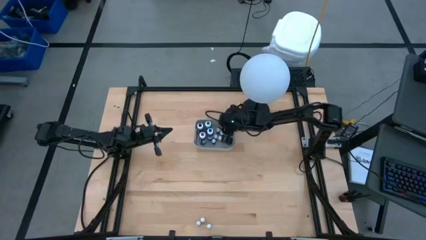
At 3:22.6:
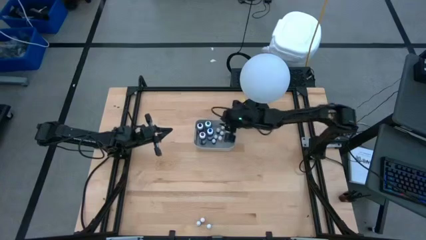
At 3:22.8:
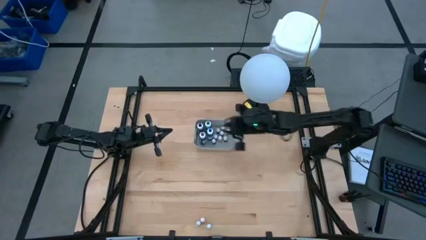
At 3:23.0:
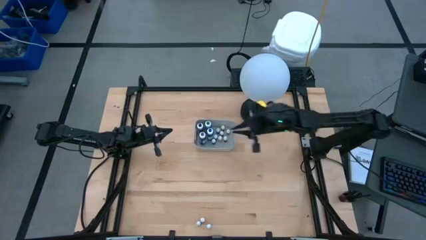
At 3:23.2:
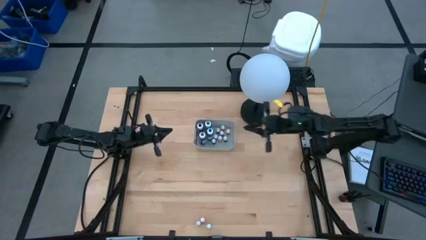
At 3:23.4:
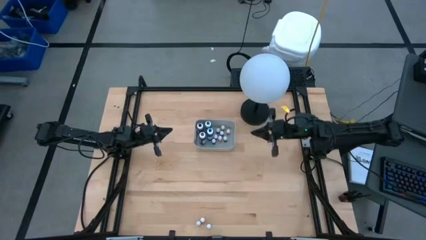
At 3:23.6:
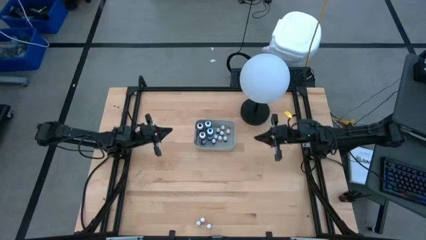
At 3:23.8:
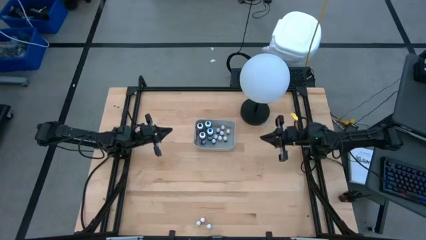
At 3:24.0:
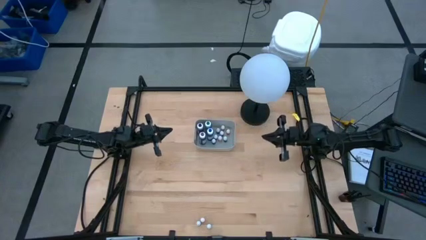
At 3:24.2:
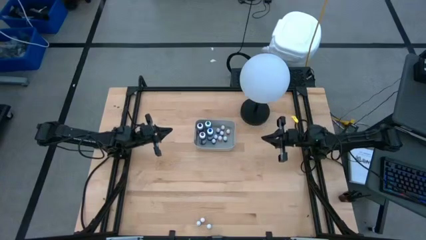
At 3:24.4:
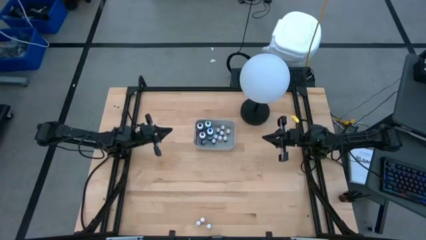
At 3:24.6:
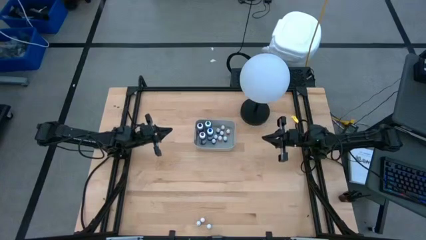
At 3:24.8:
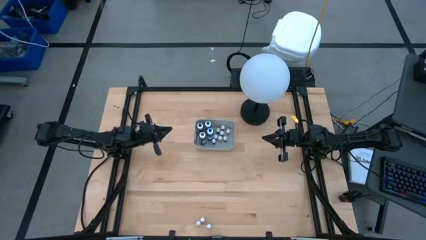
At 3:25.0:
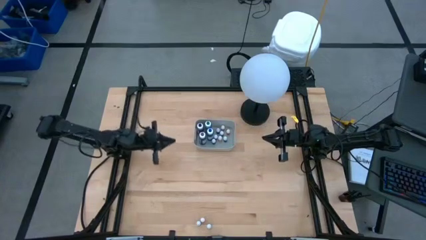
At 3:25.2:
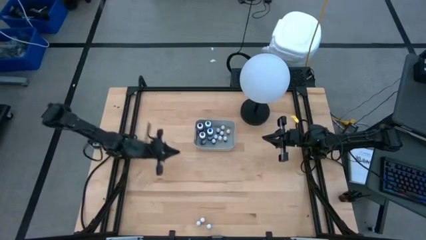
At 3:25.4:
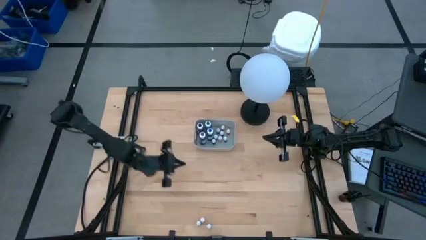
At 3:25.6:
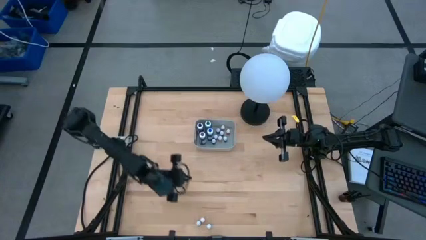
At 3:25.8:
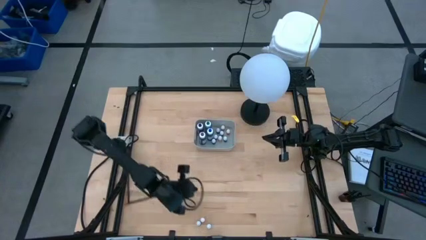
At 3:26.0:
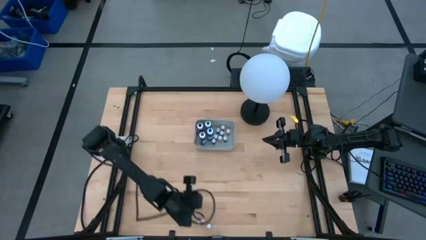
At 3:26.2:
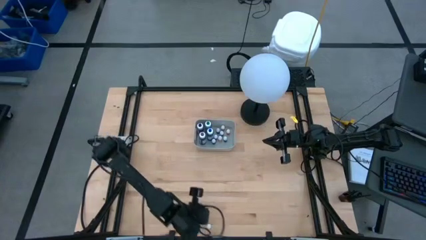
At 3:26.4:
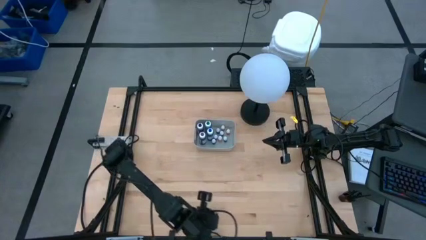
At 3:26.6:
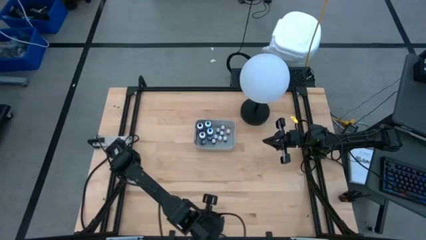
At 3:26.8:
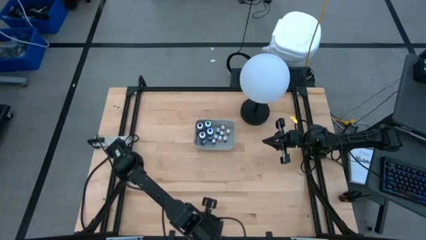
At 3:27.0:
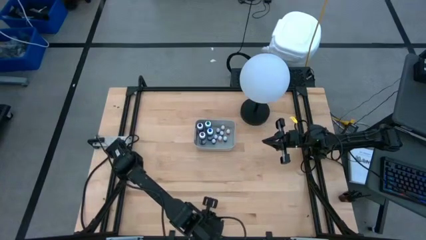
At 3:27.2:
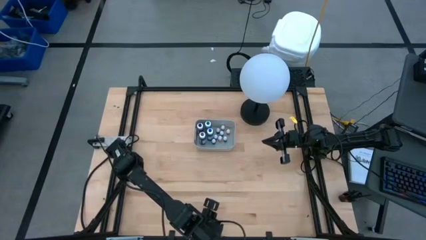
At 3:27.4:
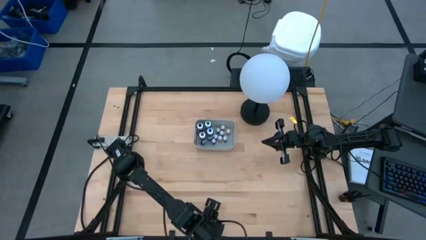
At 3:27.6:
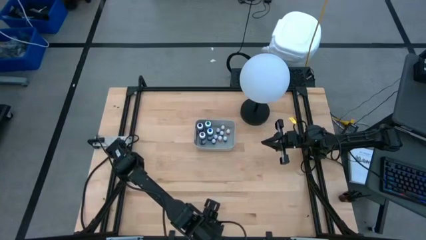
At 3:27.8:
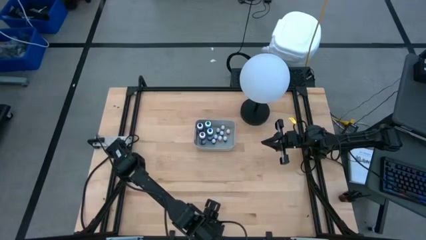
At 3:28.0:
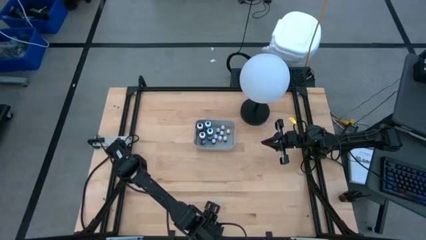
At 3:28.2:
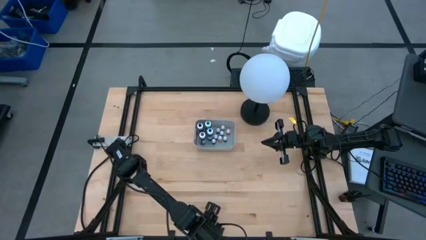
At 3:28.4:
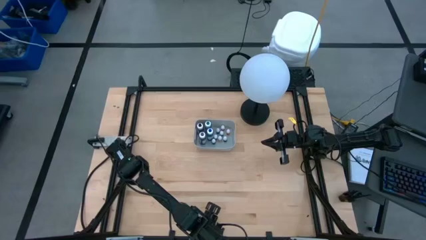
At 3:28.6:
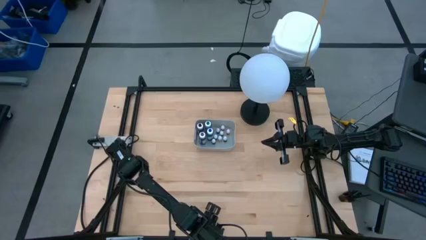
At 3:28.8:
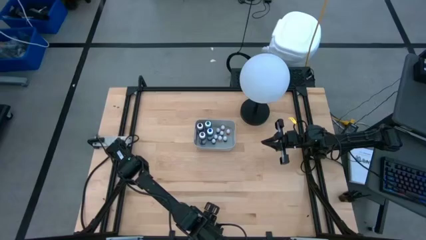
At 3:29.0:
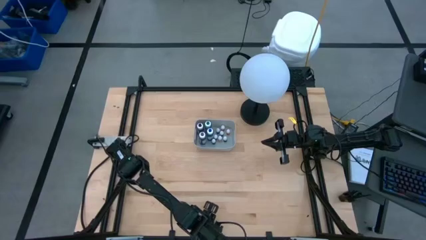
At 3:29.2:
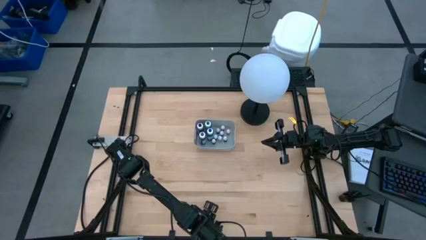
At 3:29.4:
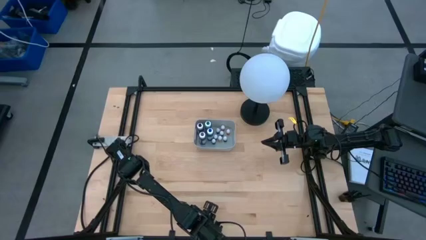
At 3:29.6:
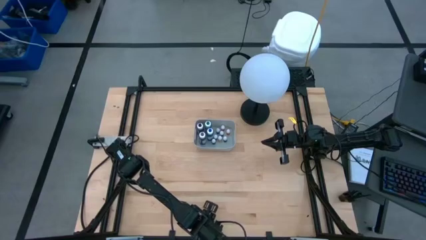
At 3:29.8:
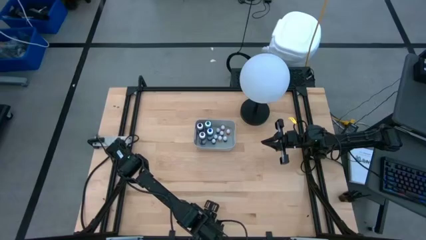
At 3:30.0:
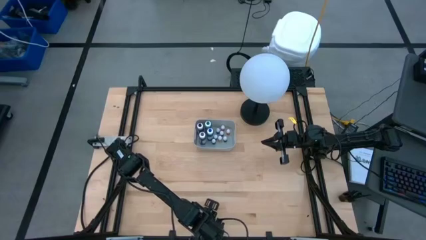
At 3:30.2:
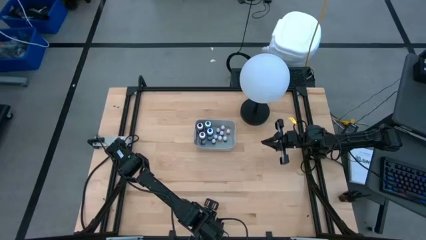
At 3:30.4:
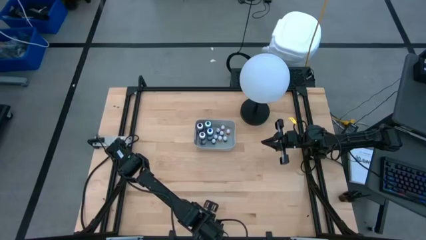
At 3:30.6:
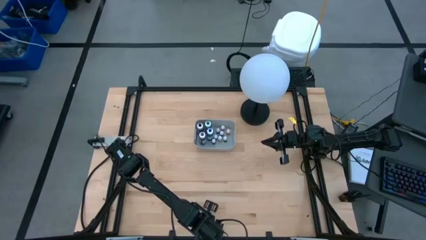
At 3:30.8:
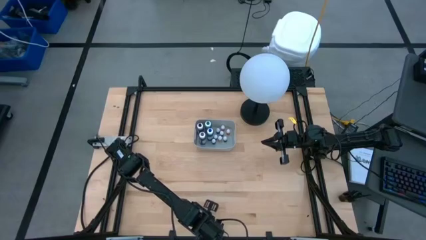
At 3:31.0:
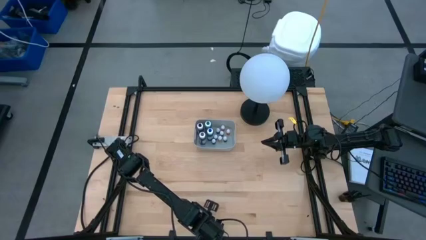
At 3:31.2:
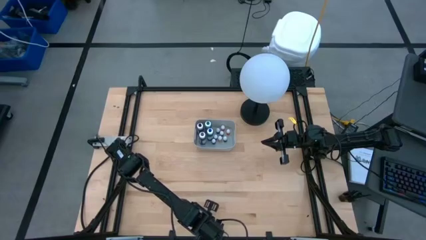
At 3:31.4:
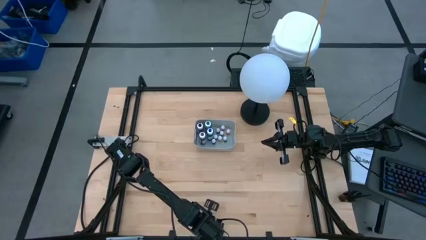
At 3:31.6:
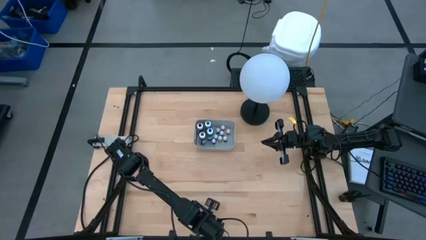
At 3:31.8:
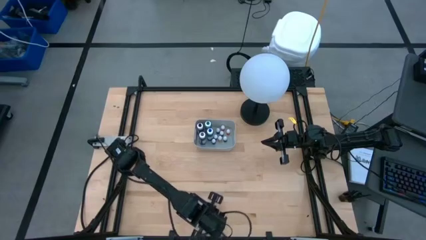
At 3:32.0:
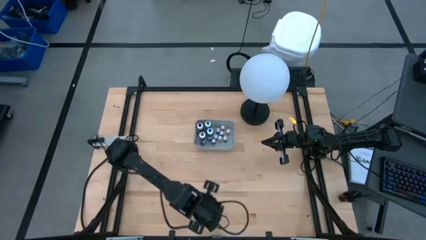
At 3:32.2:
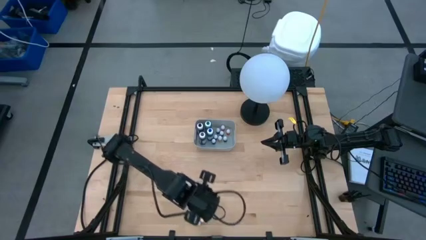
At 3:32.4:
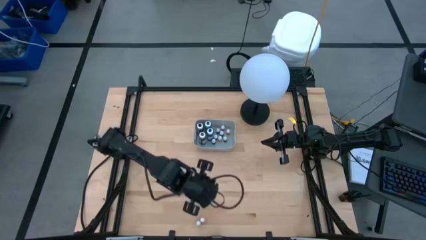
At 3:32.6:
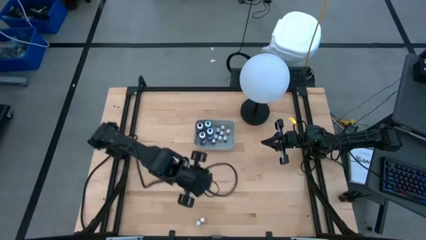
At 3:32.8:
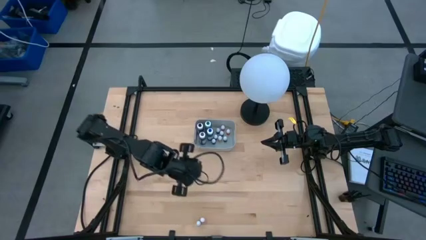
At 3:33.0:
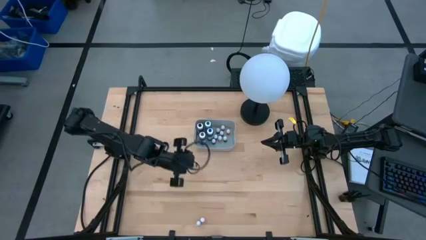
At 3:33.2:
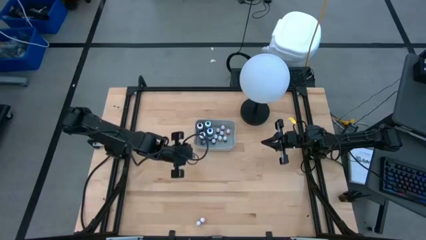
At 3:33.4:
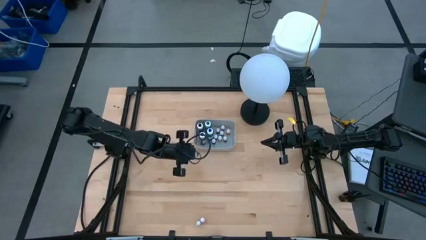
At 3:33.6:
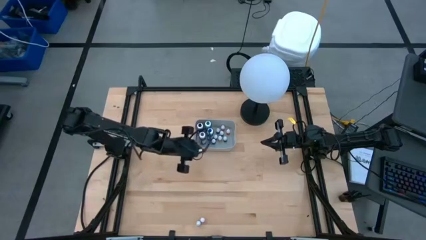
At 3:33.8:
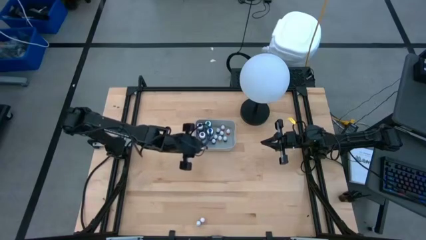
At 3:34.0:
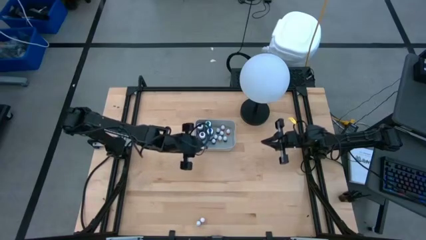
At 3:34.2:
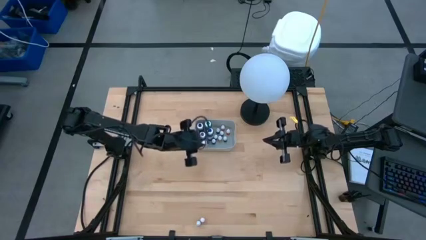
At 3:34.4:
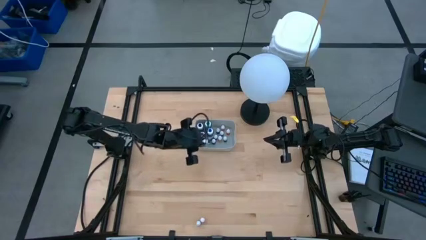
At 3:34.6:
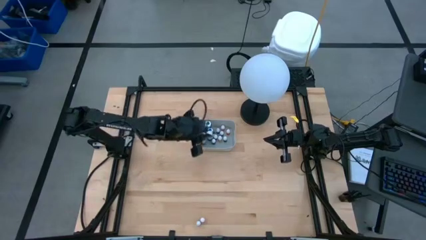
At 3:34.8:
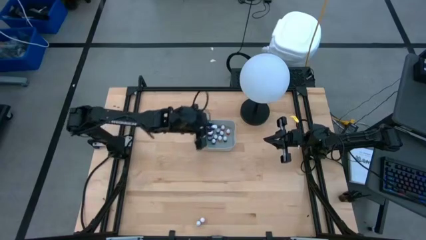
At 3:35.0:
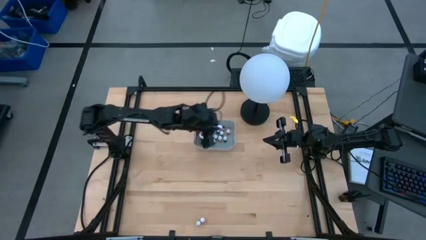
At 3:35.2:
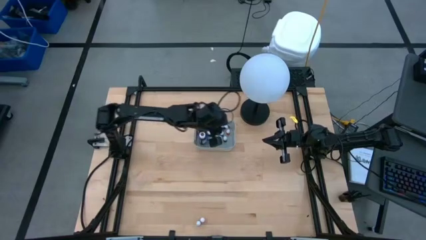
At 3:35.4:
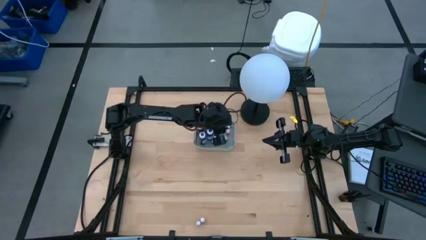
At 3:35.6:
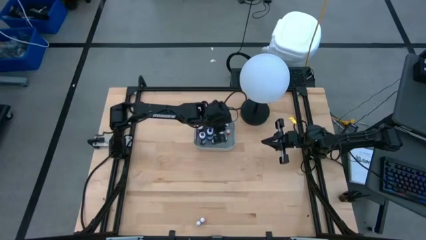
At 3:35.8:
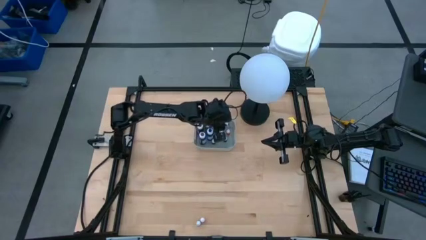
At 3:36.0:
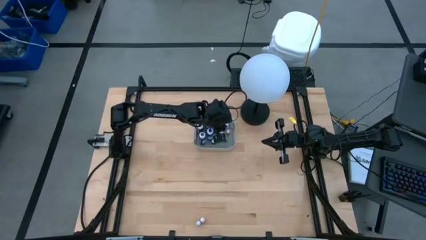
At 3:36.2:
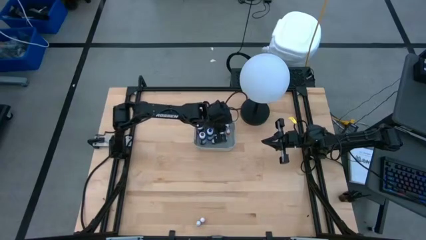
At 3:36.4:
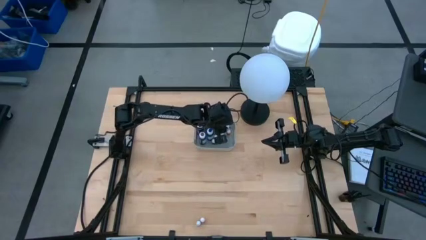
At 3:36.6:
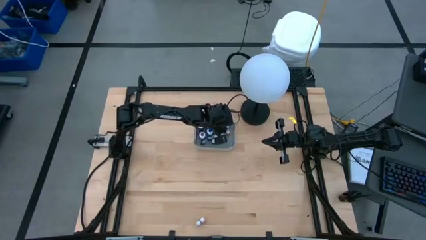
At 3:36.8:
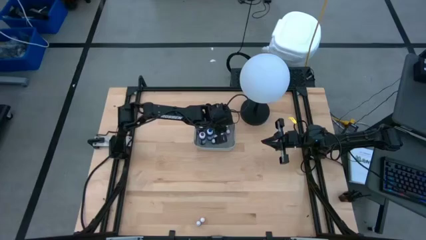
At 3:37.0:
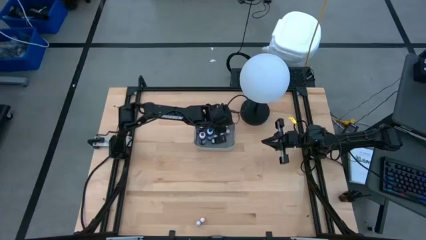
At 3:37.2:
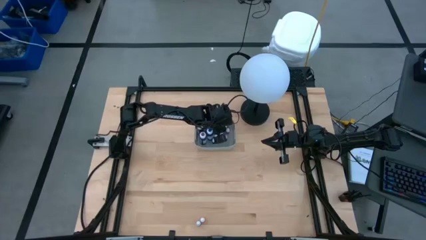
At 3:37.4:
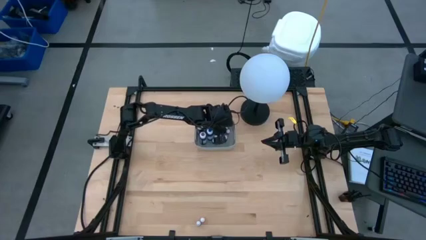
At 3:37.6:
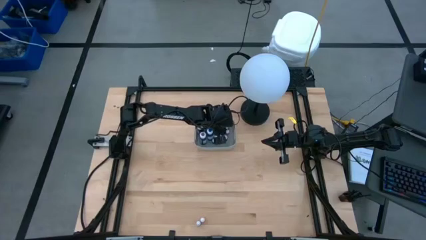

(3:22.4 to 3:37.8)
Task: Pick & Place food coloring
Put the small red food coloring bottle into the gray bin
